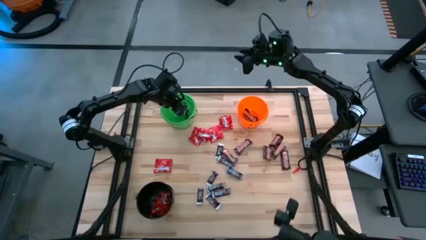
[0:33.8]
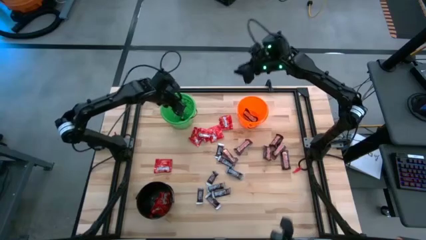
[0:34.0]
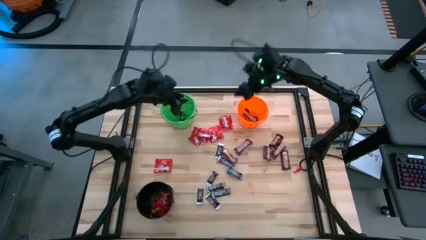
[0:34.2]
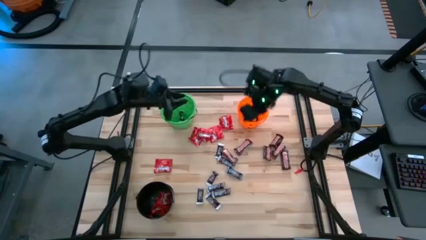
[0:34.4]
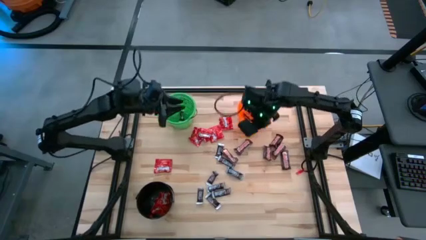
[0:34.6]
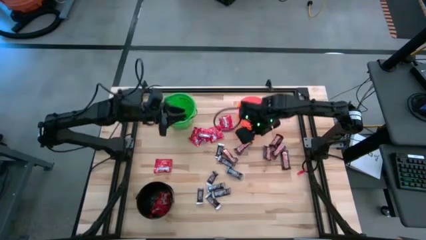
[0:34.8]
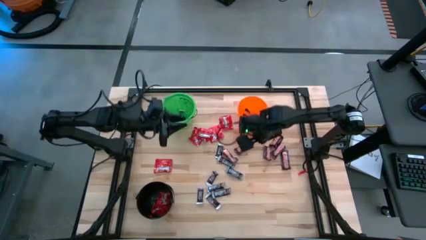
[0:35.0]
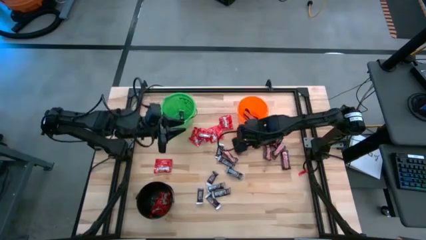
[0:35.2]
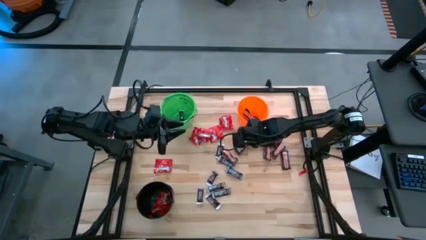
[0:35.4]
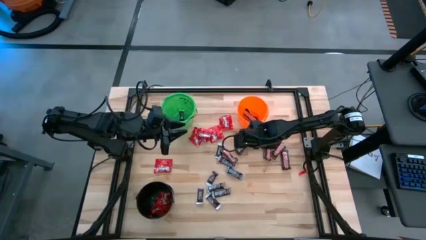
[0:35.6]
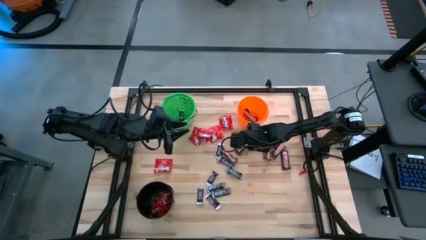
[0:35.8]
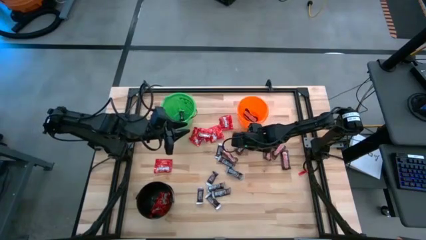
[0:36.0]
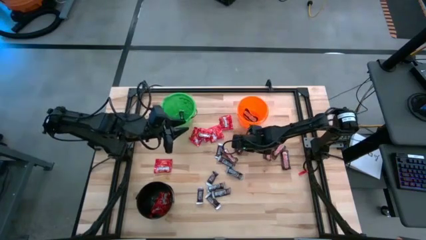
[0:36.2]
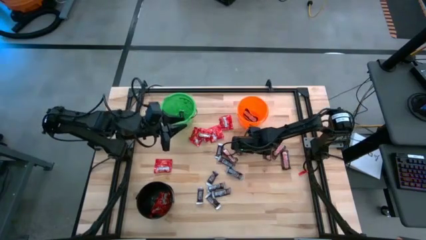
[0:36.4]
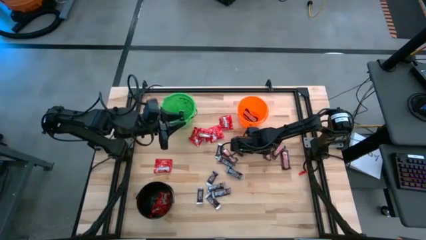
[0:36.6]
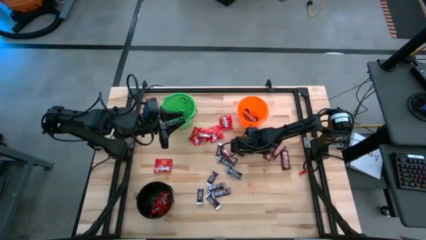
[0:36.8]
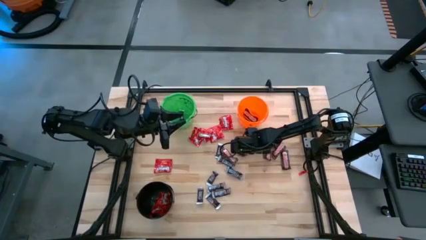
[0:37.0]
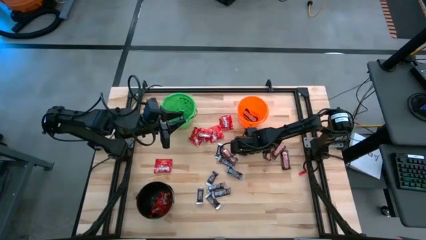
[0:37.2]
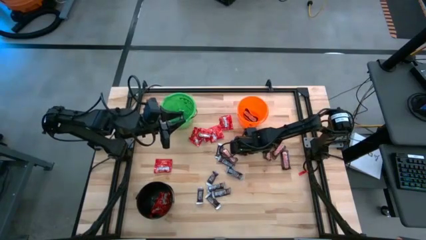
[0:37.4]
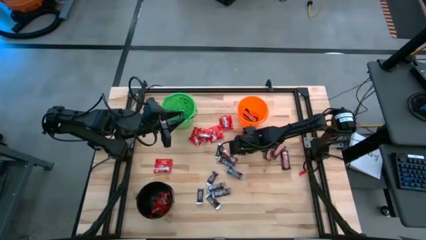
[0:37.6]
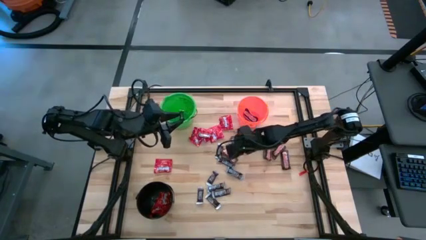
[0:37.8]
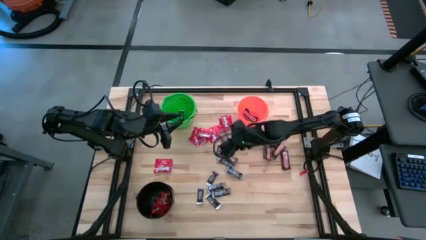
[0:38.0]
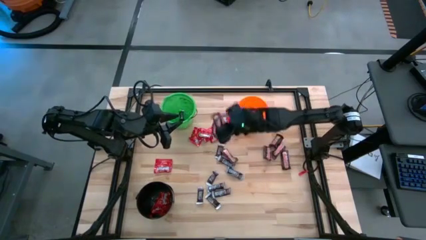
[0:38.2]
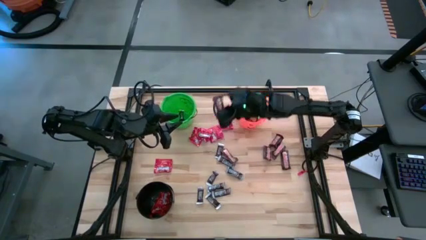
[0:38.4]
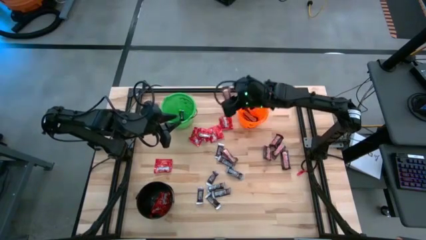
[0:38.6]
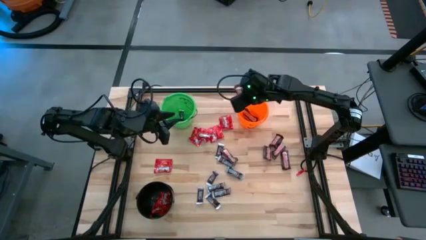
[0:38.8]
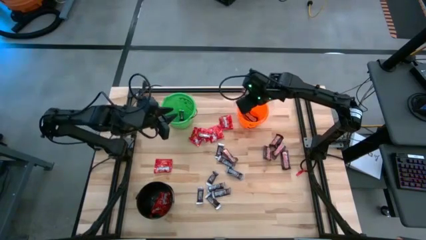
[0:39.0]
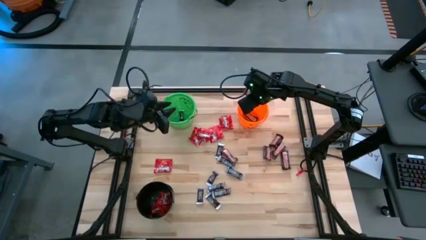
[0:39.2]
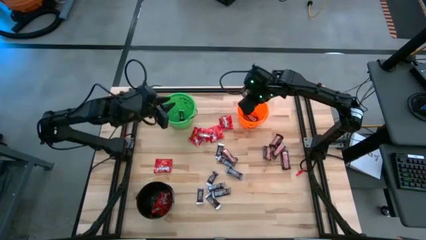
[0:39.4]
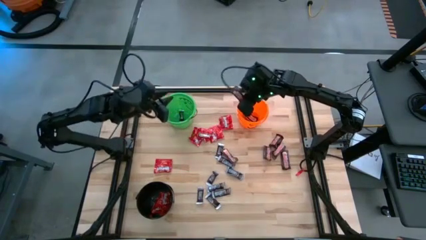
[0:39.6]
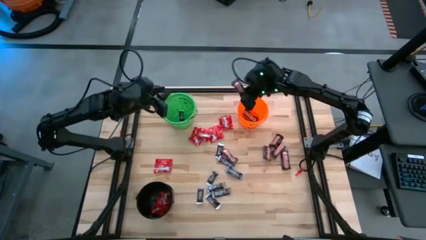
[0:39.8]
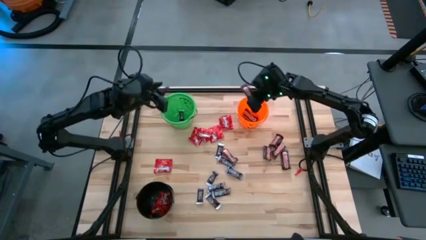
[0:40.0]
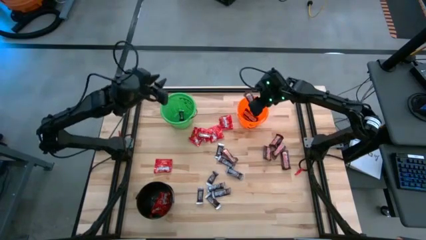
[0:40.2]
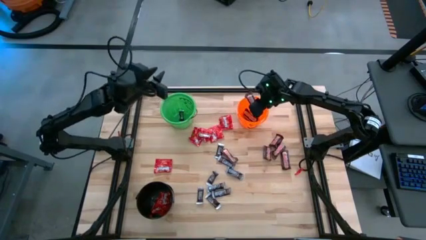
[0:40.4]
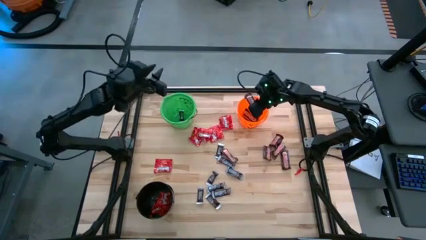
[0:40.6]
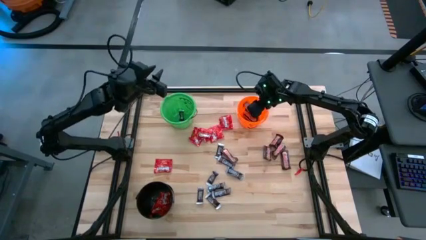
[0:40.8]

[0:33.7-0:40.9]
Task: Sort candy
Put the brown chocolate into the orange bucket

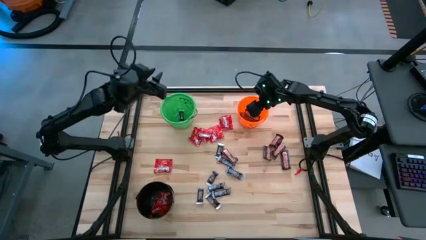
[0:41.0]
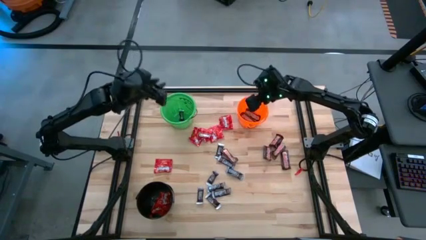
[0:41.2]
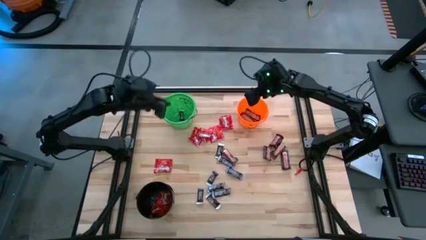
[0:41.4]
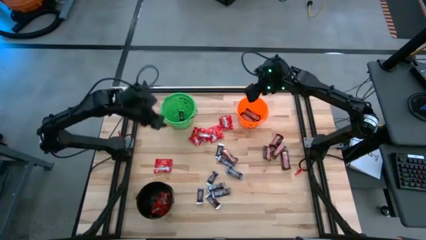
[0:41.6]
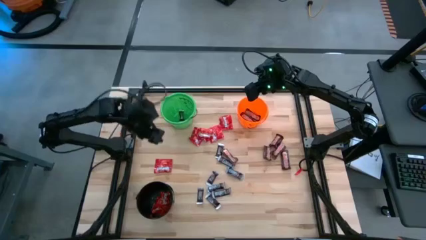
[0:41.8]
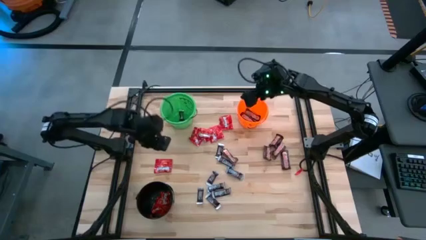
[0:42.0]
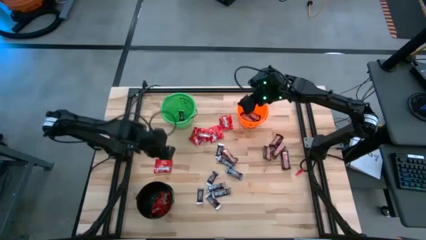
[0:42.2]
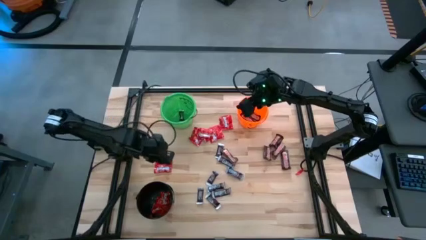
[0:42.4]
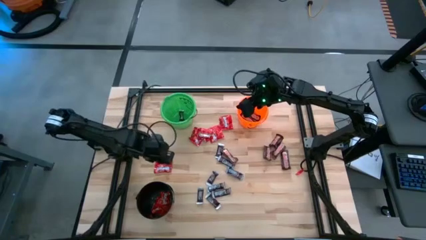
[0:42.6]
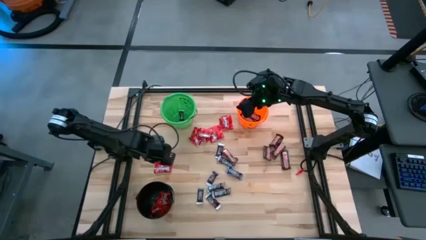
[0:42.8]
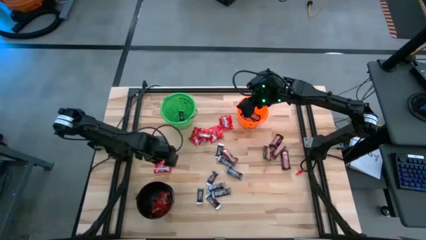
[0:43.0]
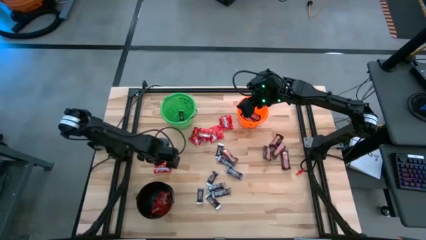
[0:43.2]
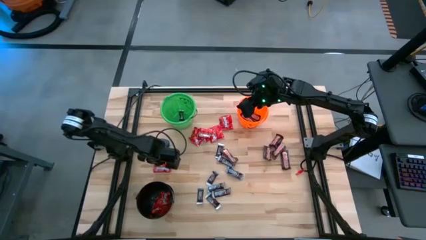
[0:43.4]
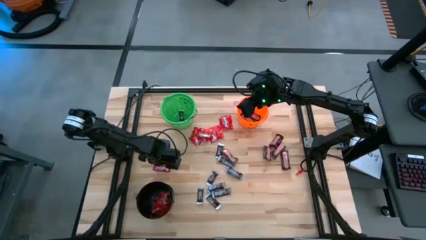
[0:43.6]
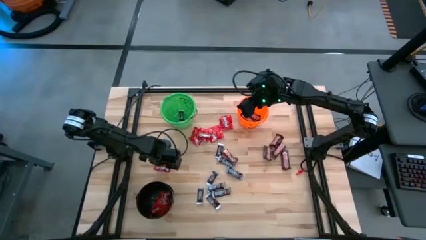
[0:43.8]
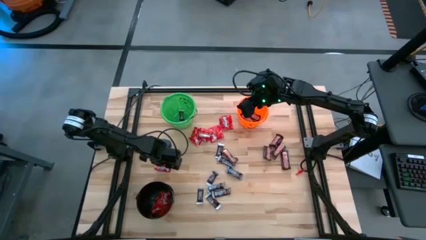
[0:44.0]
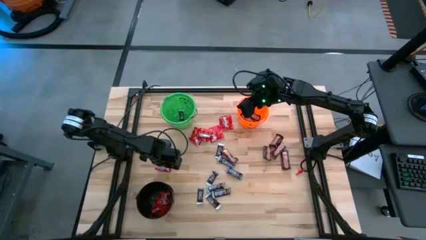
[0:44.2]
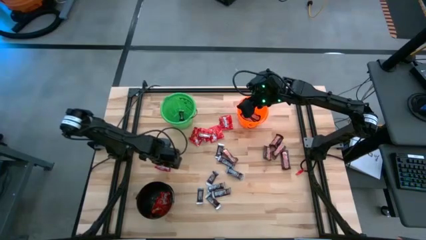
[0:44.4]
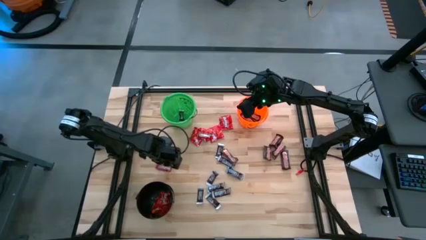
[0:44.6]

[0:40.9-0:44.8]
Put the red candy into the black bucket

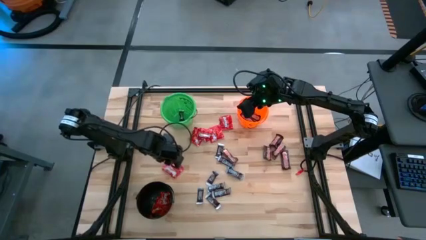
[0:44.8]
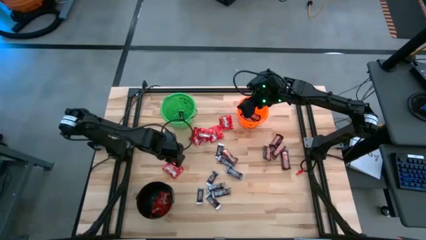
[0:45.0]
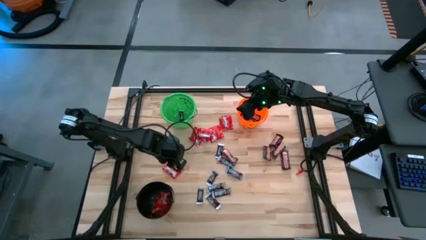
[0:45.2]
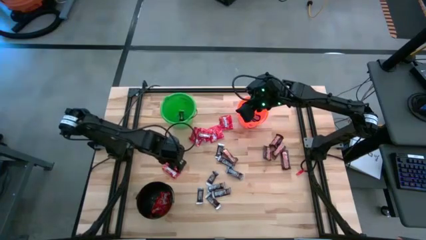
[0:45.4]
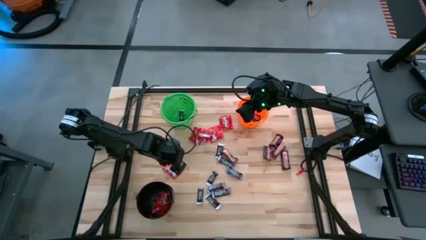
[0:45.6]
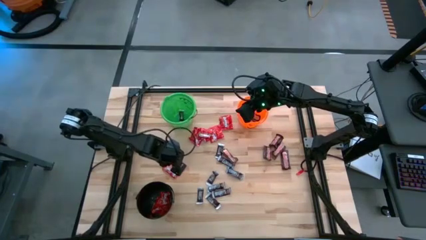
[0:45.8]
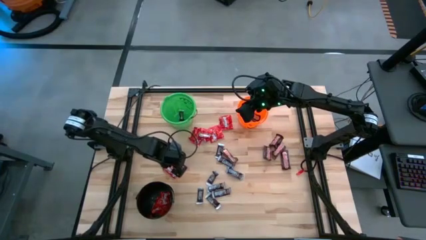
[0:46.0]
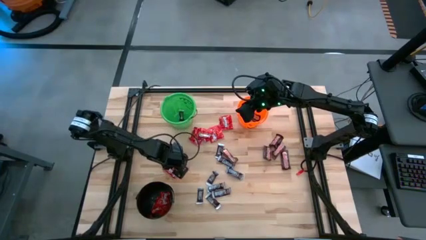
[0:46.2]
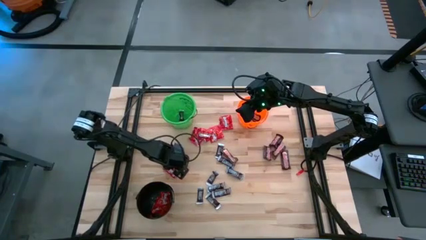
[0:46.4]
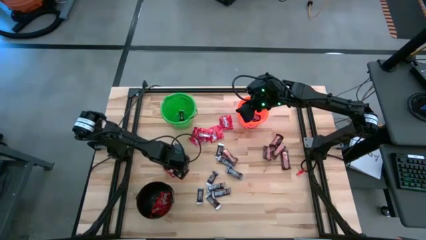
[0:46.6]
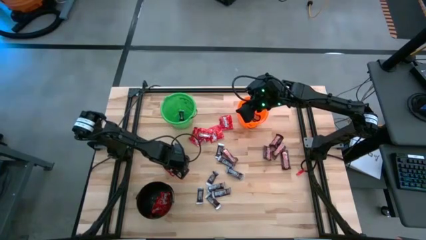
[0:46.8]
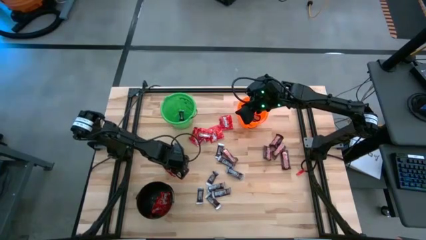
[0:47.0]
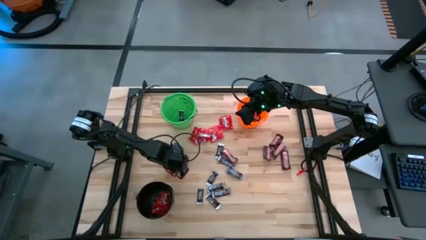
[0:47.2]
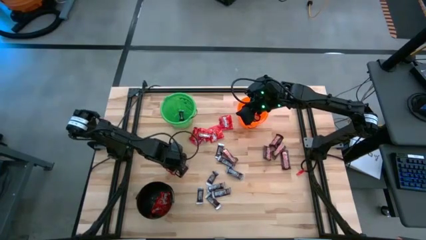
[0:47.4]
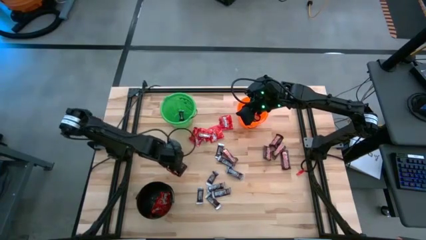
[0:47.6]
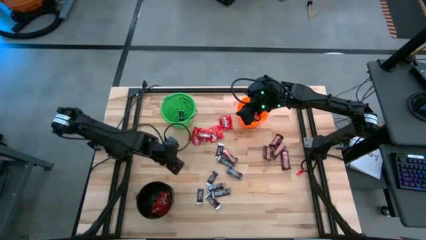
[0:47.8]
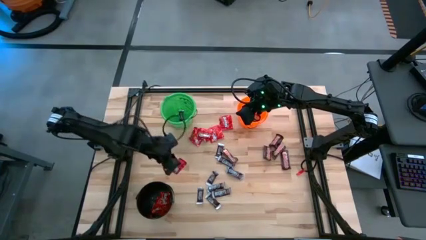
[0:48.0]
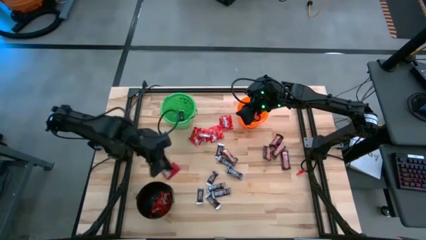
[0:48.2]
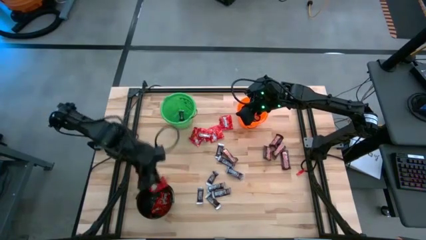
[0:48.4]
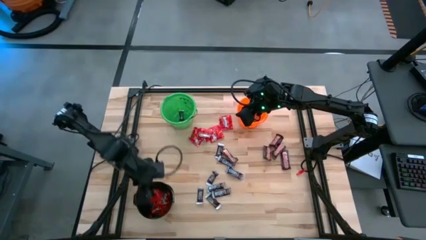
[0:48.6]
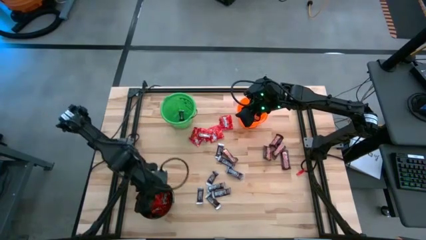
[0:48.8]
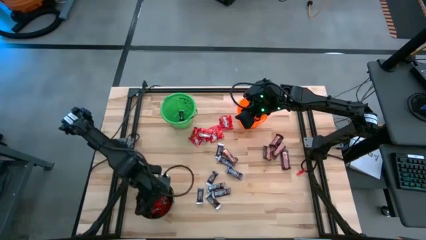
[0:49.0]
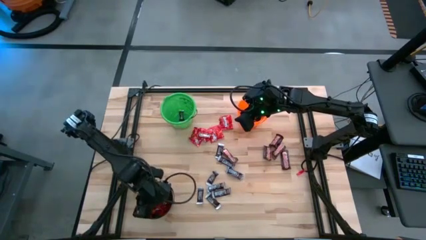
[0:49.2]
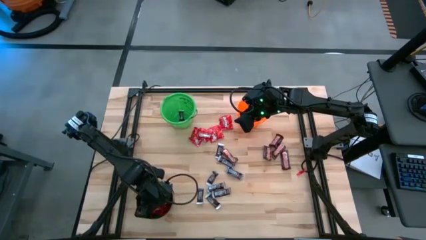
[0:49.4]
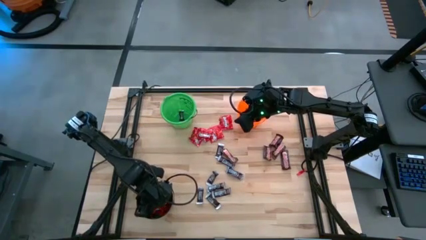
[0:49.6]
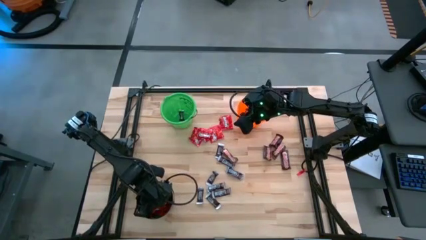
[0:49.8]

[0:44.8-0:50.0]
Put the red candy into the black bucket
